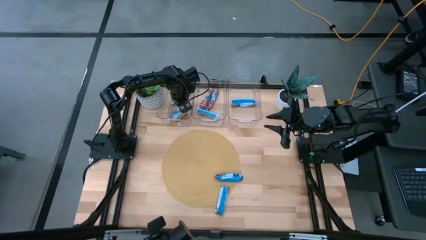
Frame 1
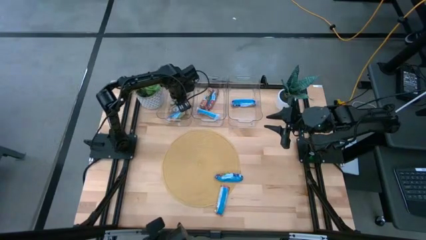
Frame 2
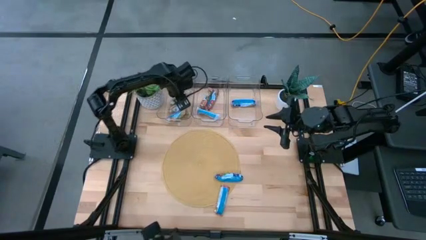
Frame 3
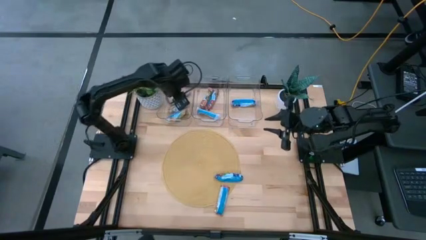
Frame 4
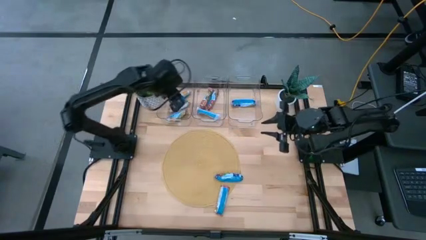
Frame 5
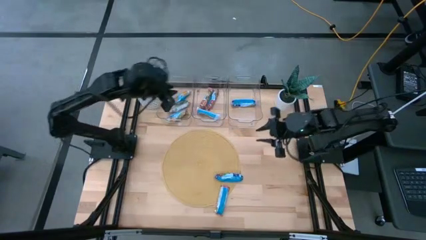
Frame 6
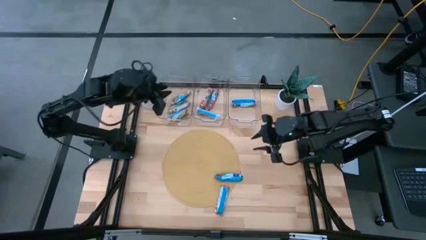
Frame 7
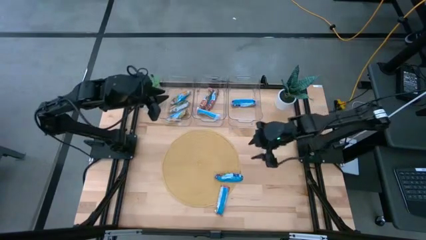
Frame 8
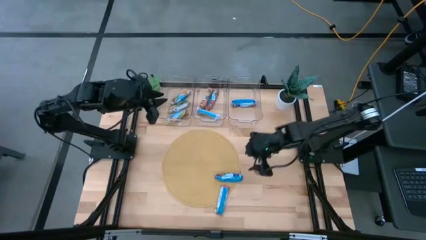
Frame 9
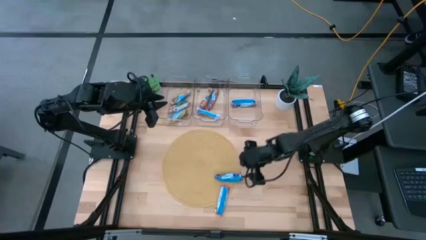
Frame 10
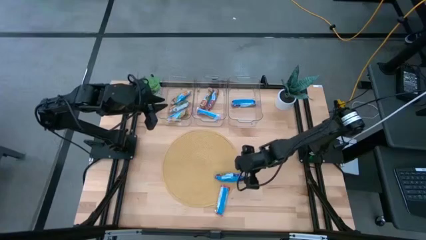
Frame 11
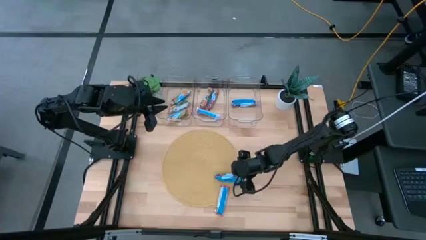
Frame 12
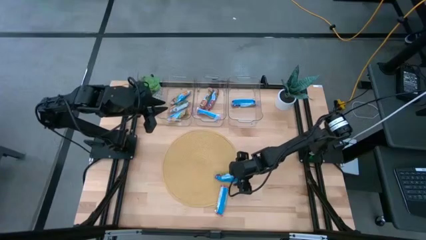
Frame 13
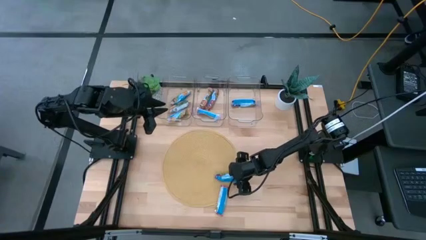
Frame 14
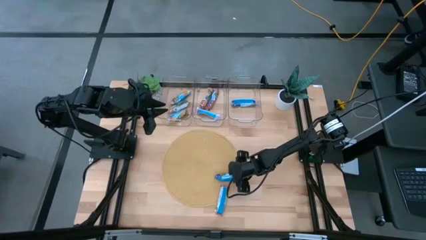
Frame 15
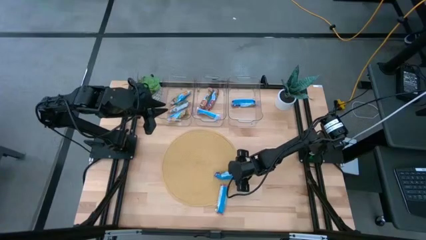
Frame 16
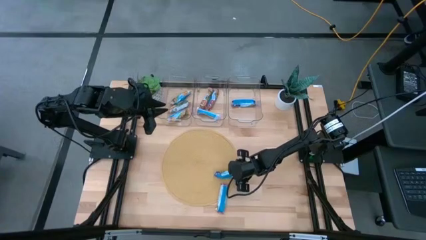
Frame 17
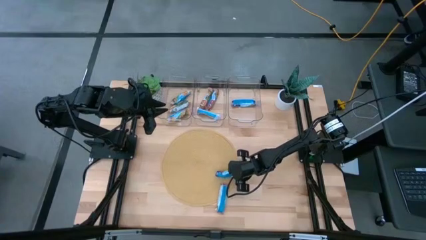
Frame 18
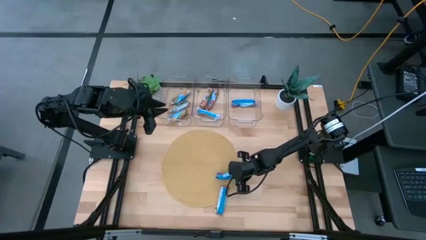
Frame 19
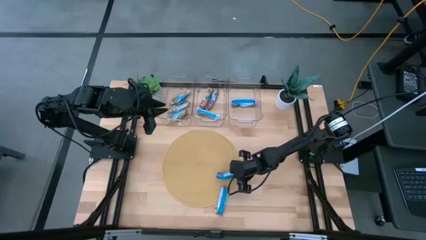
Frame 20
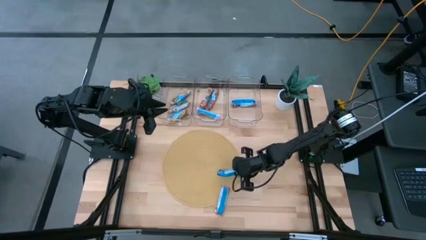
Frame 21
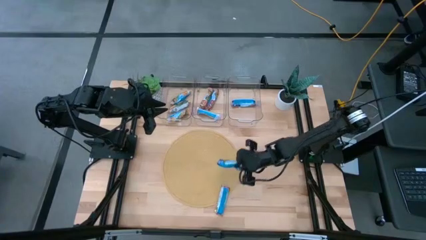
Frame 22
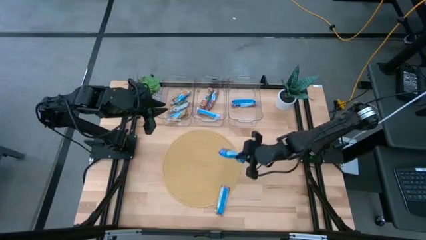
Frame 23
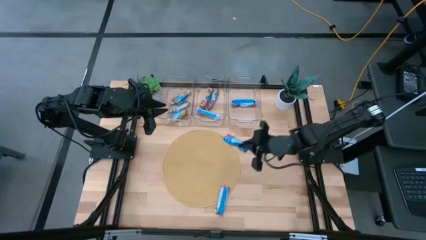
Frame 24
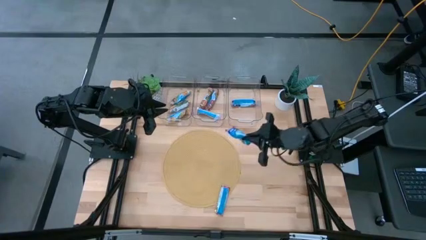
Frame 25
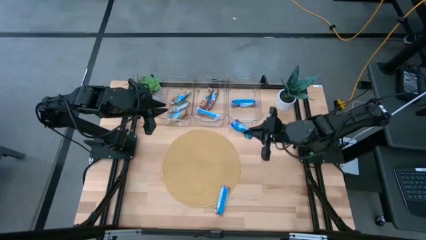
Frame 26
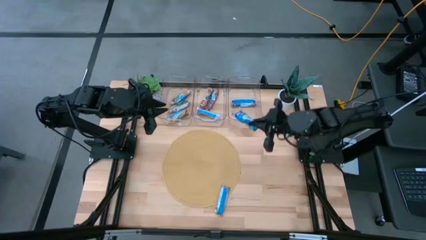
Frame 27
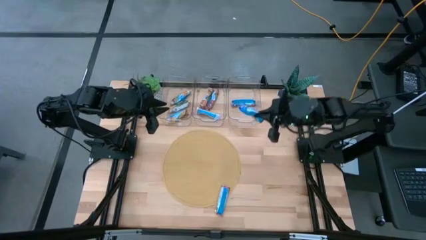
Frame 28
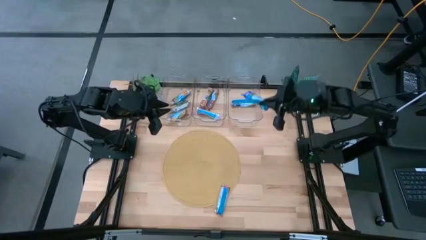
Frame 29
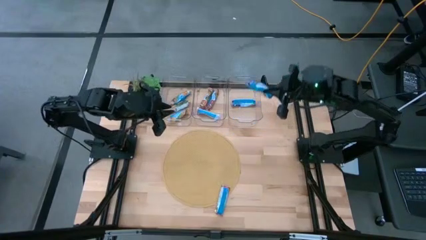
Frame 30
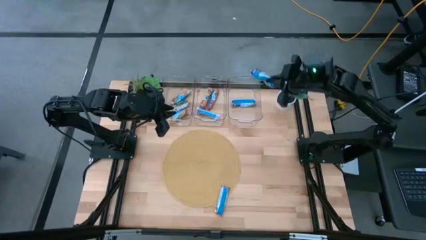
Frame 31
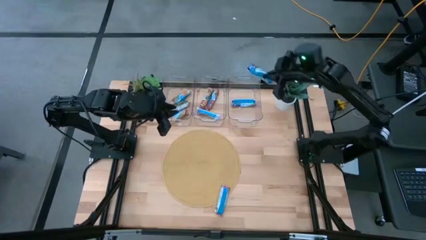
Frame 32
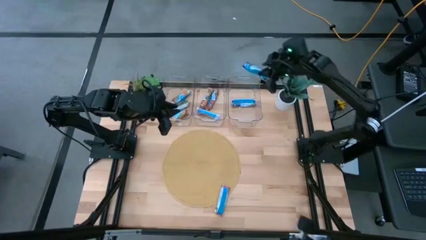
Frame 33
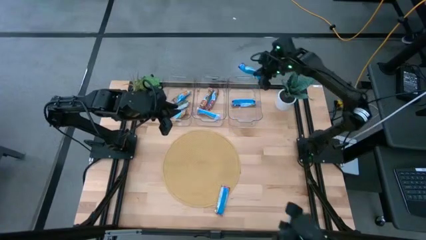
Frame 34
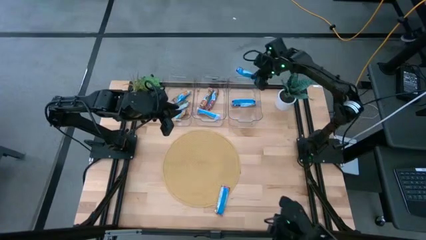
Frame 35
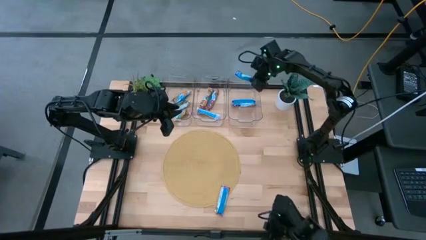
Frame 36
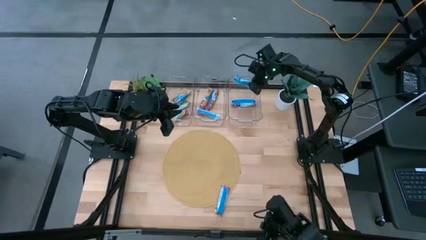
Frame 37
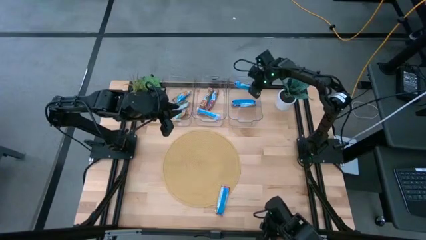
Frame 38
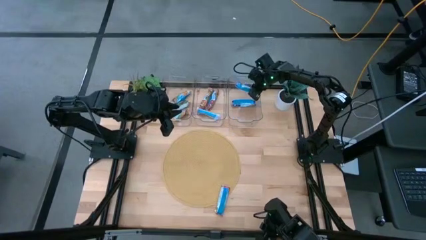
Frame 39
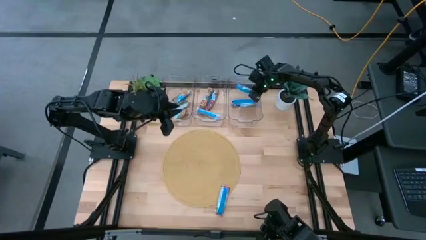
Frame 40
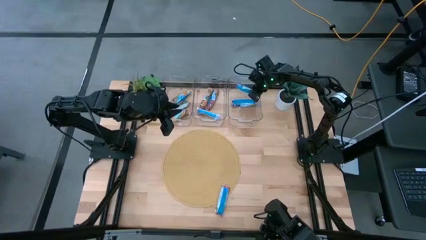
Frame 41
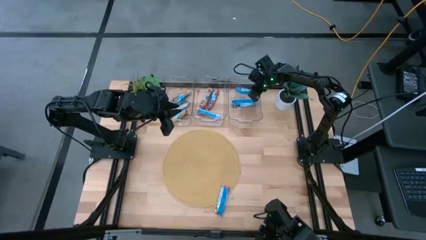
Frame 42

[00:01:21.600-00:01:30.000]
Task: Pick and place Granola Bars by type
Put the blue granola bar into the right transparent bin

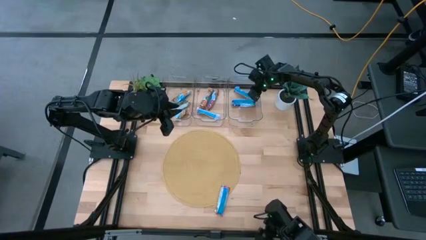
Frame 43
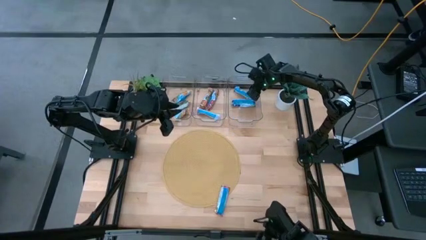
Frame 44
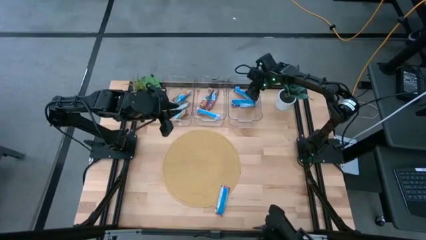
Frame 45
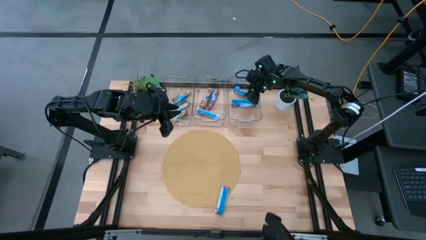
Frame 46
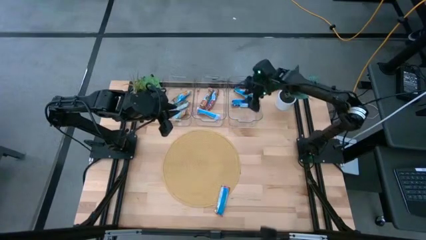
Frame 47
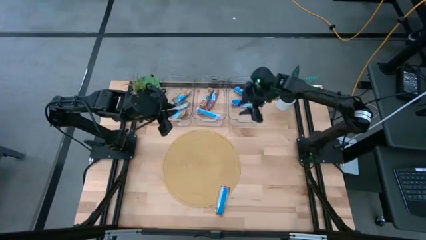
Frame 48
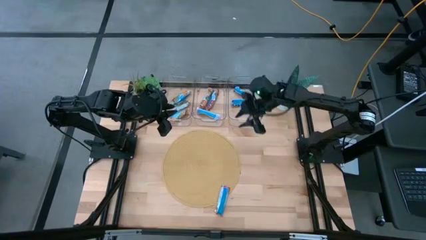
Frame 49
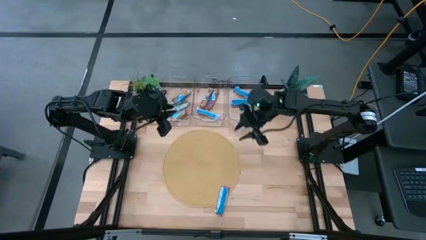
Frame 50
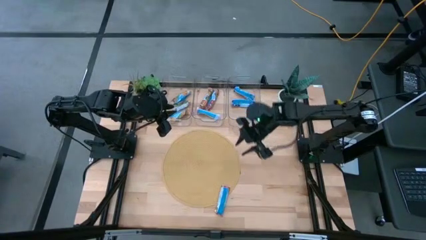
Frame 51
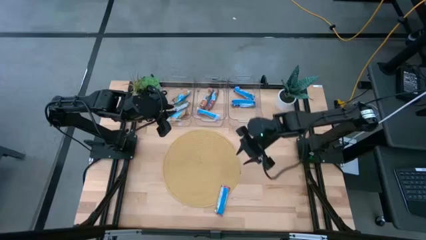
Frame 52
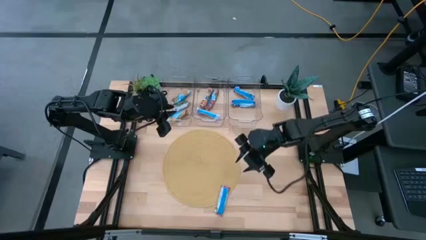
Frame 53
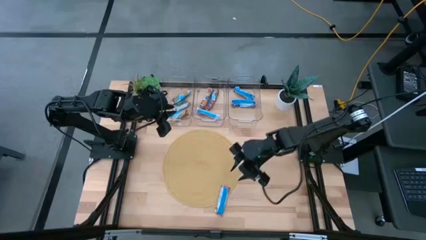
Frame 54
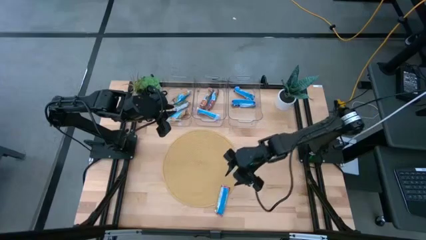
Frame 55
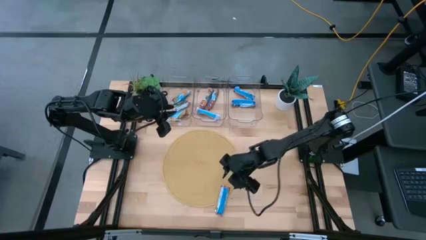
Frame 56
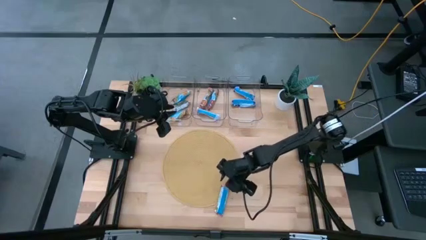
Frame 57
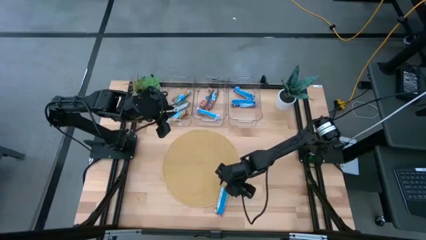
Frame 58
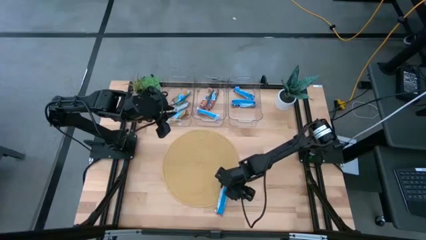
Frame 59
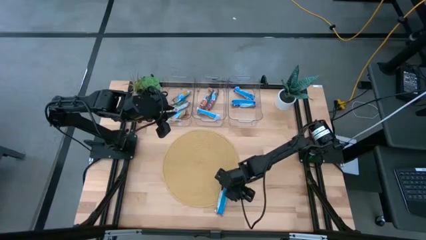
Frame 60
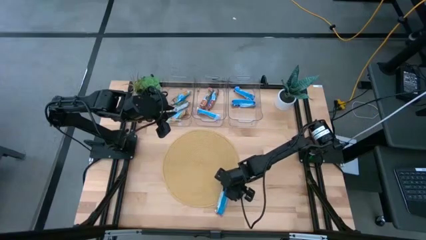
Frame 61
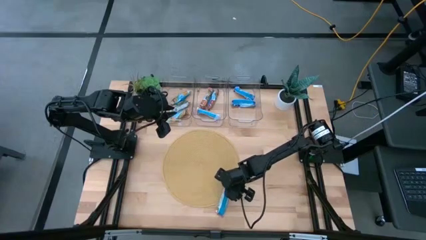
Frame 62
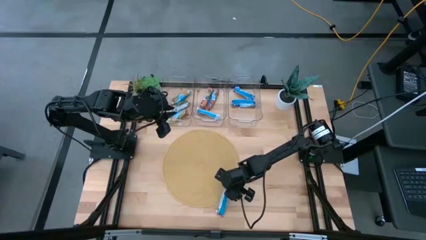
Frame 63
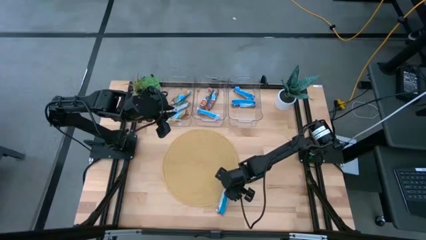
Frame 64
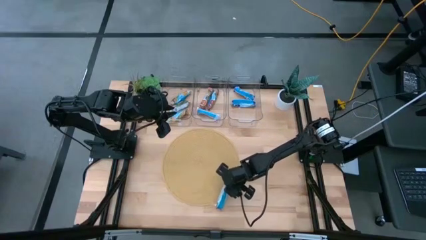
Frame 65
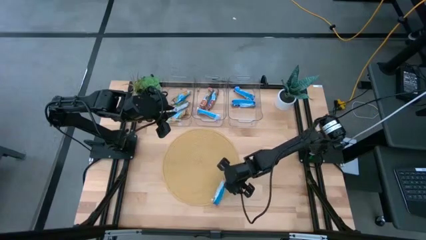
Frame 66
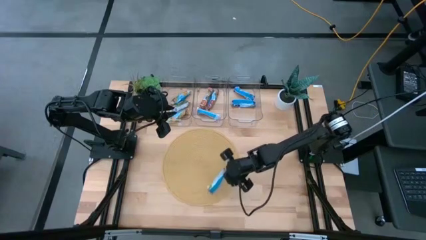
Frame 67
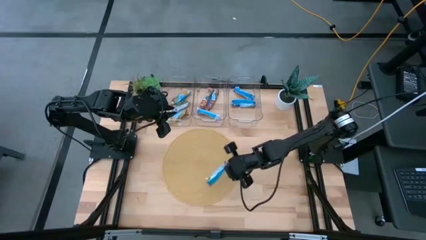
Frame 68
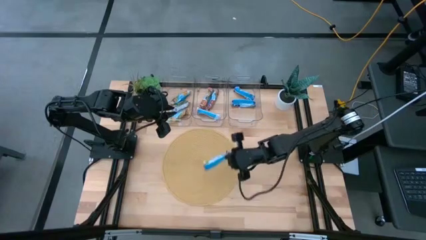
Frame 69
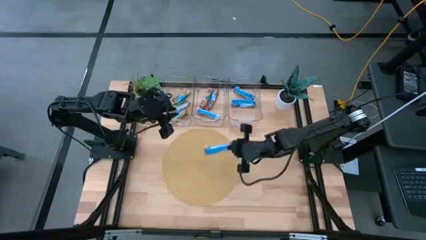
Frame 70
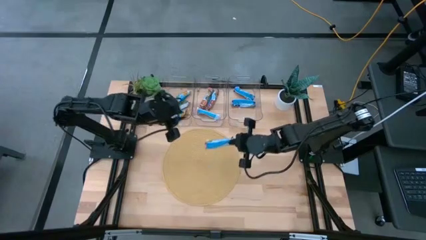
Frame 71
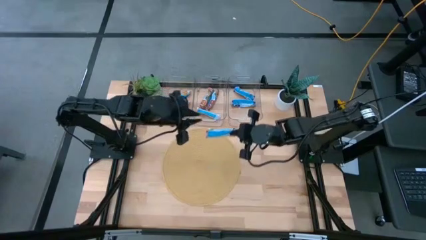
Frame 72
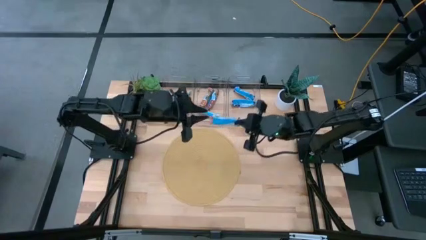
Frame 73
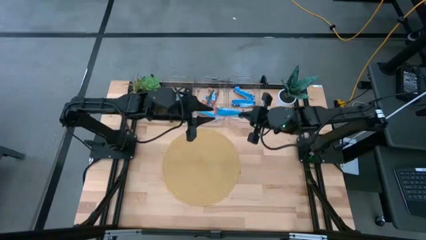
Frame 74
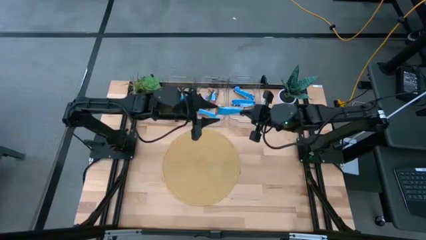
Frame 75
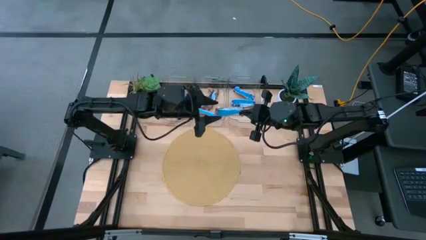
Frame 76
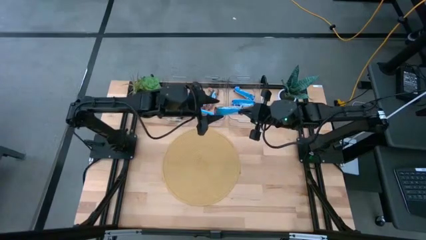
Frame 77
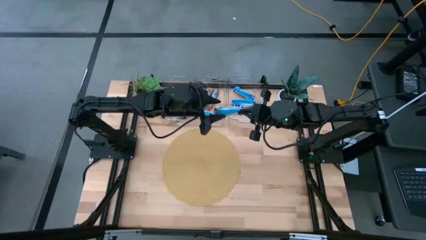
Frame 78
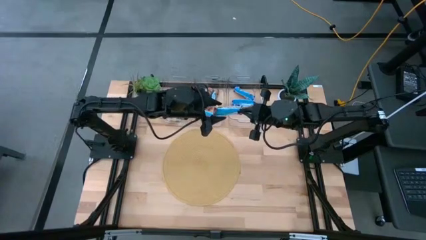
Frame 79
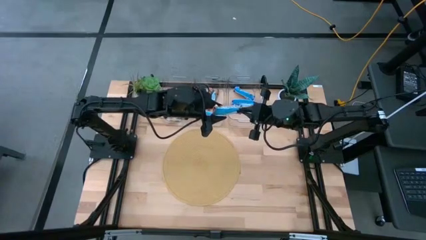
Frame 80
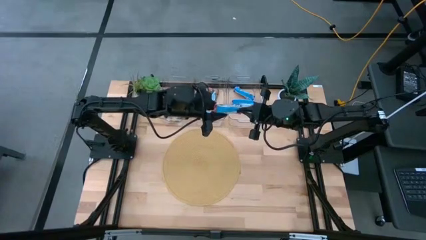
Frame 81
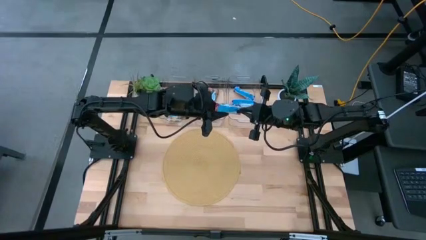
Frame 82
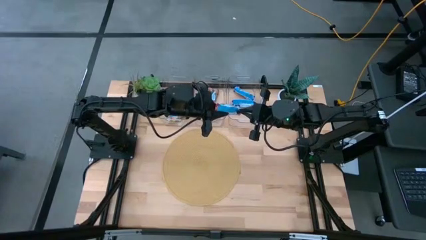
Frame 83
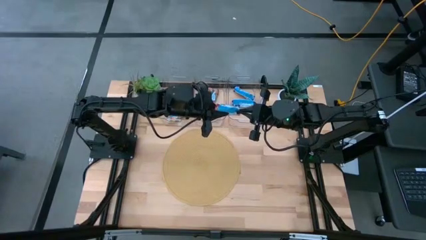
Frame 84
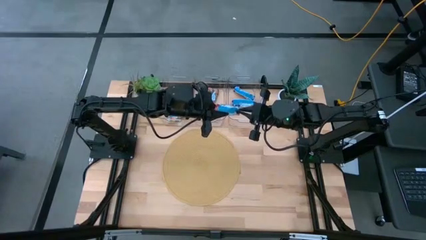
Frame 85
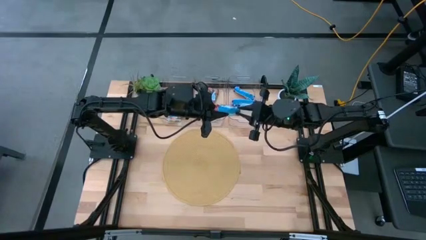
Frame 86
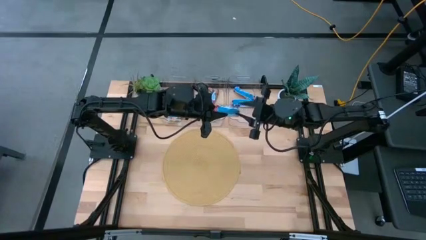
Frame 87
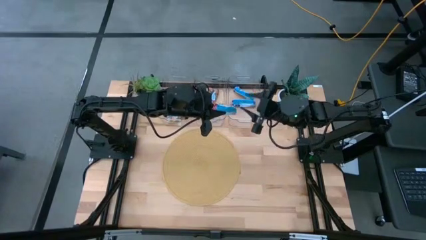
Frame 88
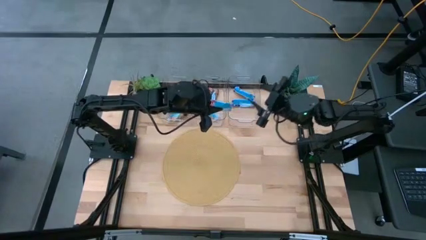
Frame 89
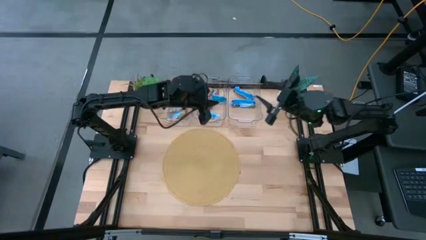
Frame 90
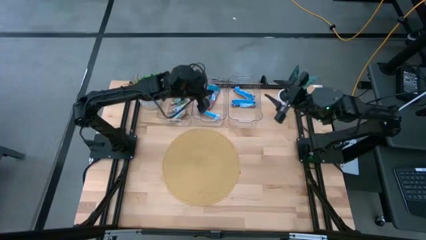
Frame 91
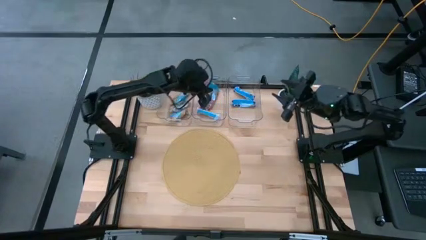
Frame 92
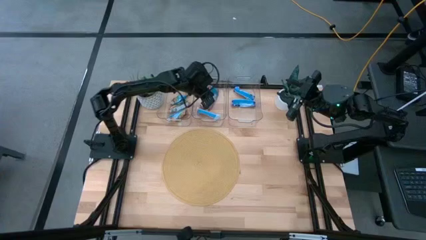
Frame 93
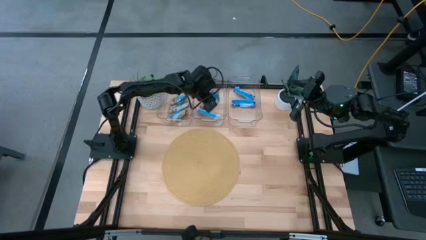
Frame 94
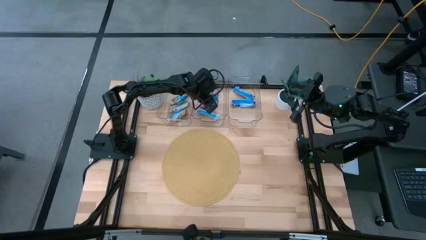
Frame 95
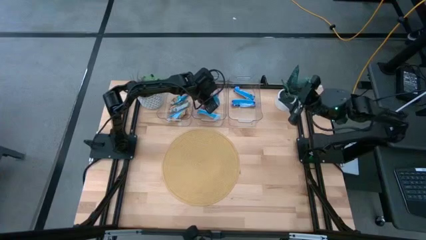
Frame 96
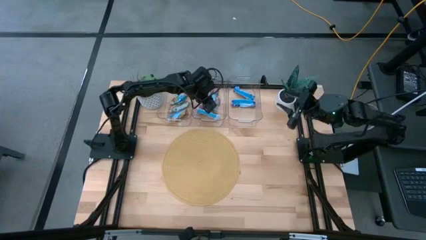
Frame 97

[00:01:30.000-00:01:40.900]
Put the red granola bar into the middle transparent bin
